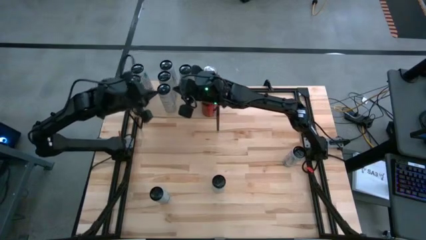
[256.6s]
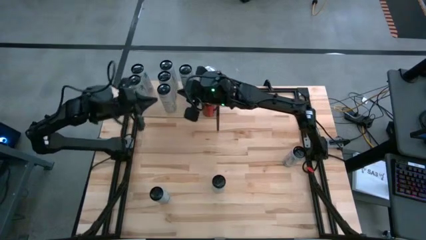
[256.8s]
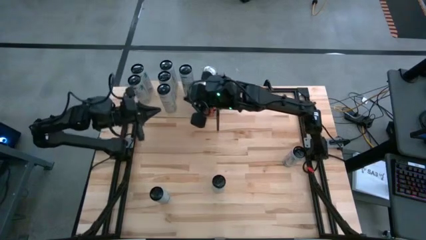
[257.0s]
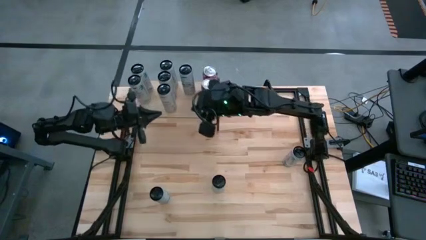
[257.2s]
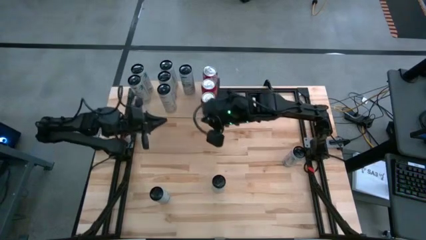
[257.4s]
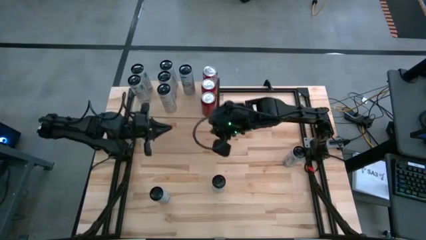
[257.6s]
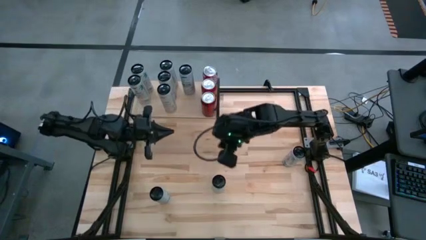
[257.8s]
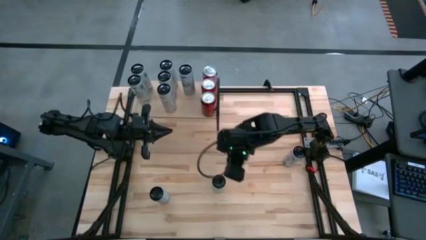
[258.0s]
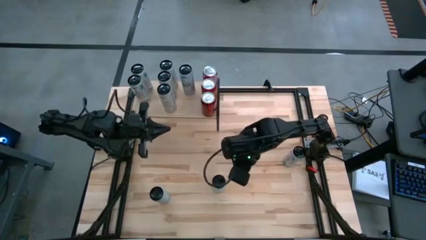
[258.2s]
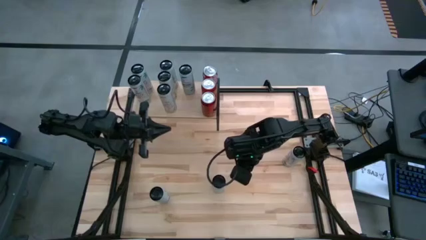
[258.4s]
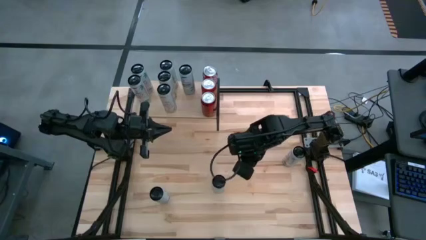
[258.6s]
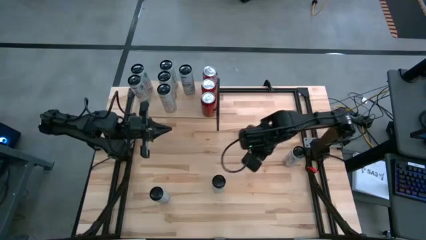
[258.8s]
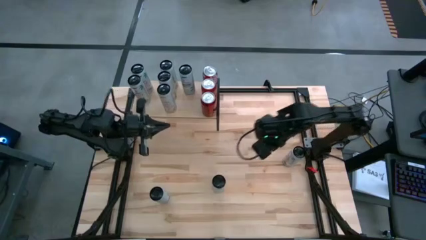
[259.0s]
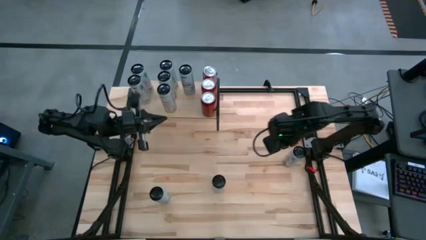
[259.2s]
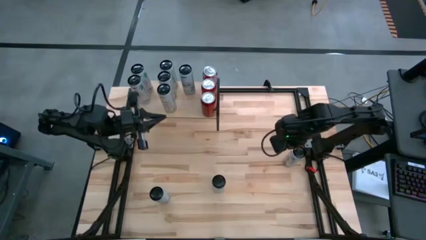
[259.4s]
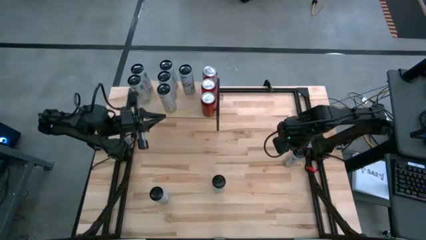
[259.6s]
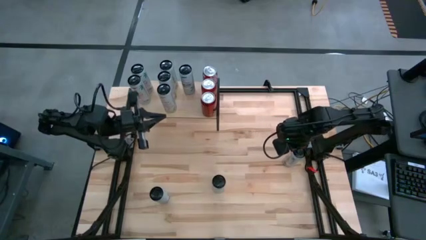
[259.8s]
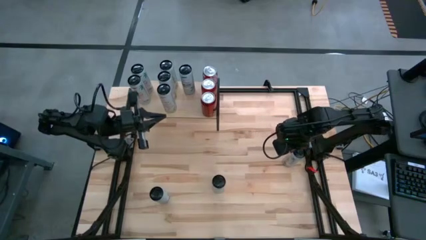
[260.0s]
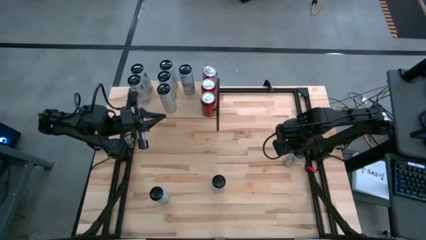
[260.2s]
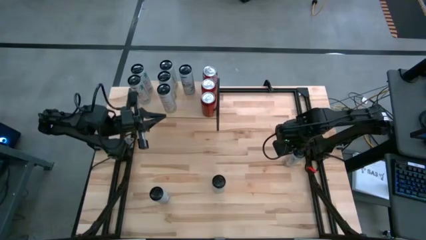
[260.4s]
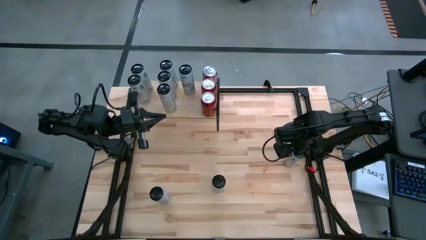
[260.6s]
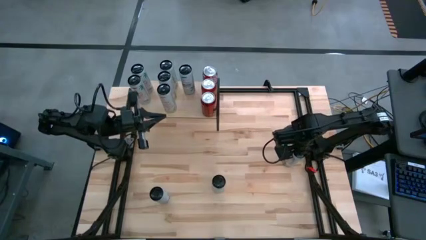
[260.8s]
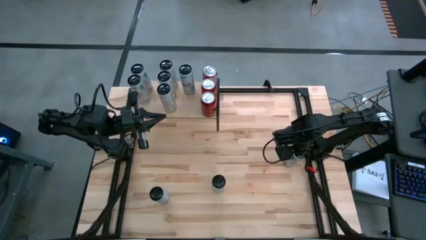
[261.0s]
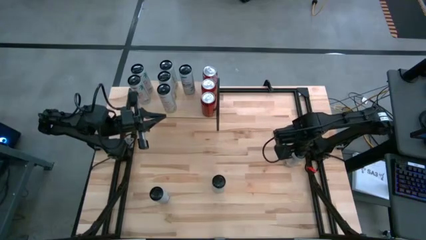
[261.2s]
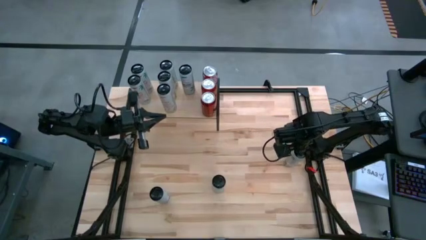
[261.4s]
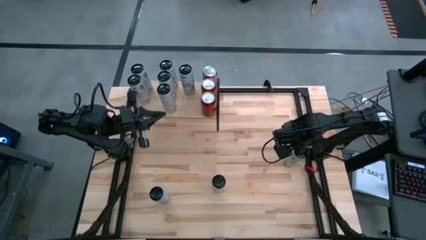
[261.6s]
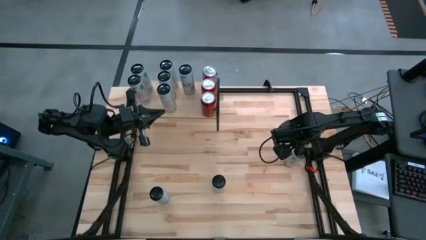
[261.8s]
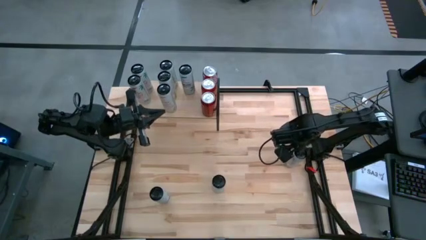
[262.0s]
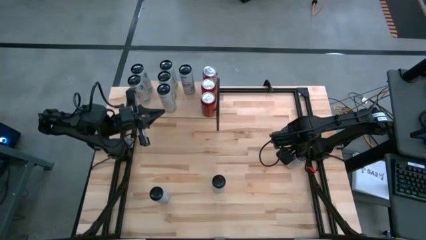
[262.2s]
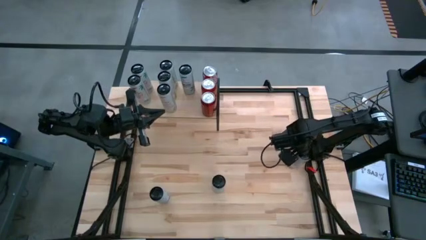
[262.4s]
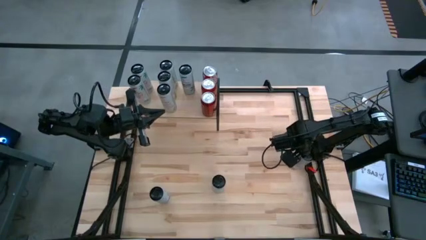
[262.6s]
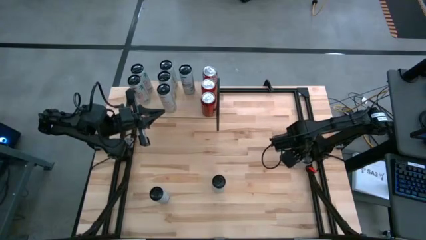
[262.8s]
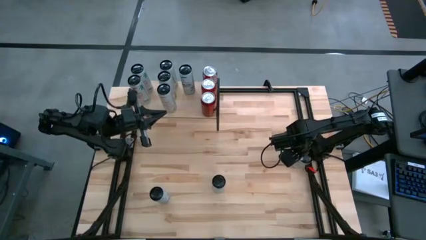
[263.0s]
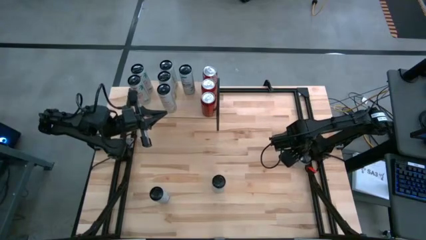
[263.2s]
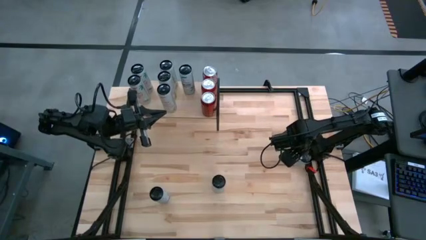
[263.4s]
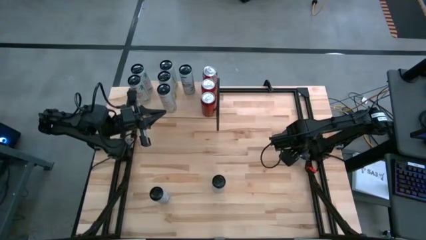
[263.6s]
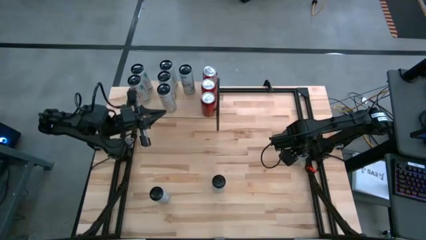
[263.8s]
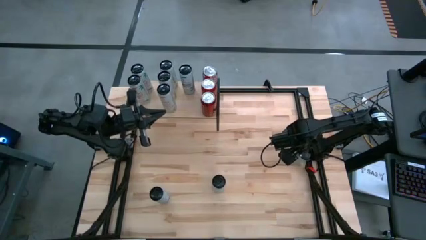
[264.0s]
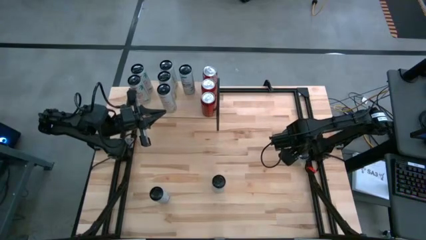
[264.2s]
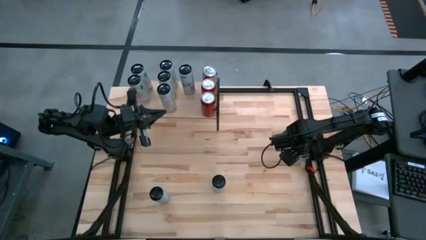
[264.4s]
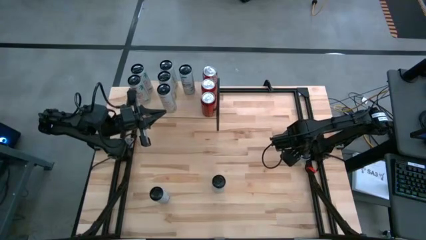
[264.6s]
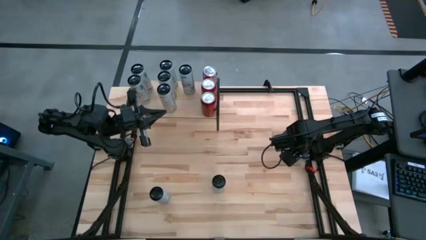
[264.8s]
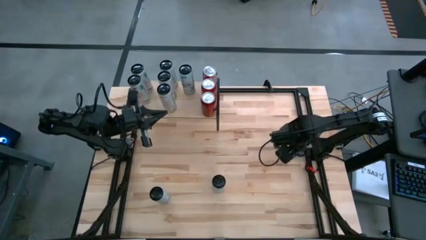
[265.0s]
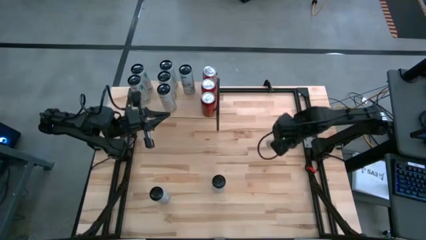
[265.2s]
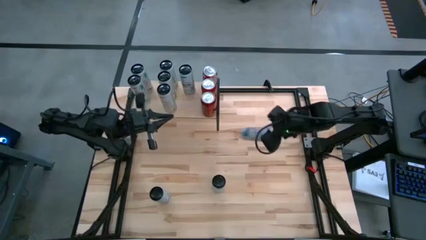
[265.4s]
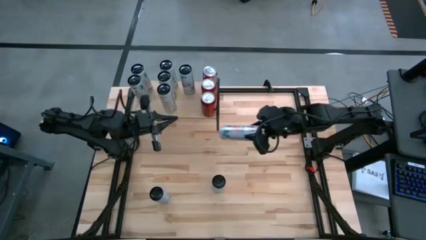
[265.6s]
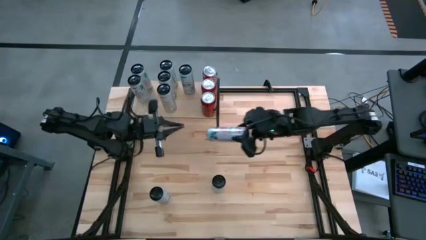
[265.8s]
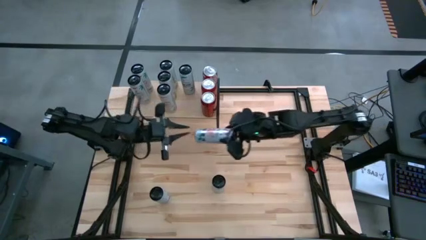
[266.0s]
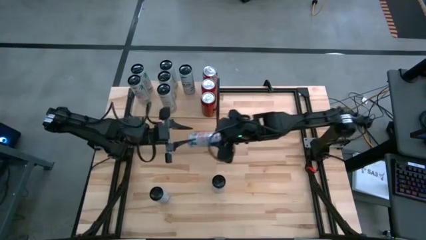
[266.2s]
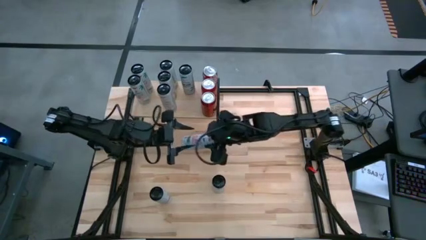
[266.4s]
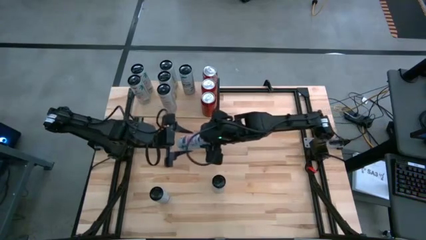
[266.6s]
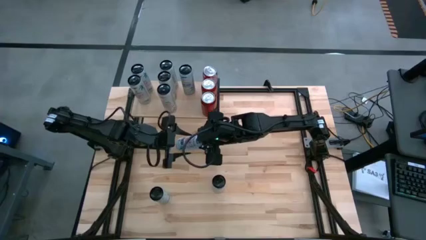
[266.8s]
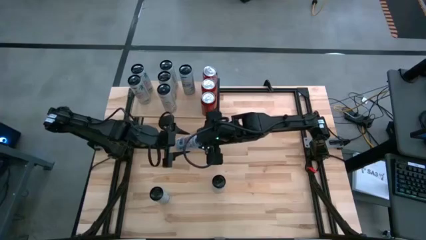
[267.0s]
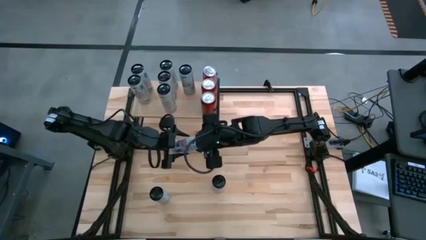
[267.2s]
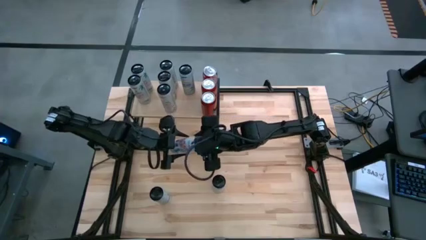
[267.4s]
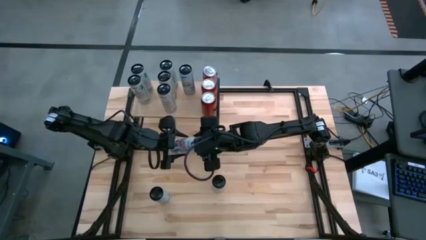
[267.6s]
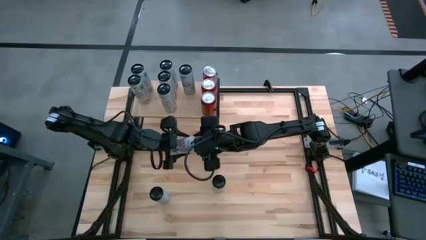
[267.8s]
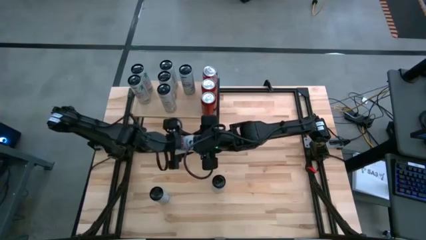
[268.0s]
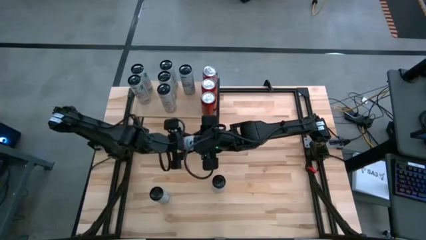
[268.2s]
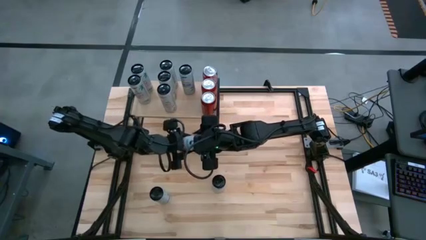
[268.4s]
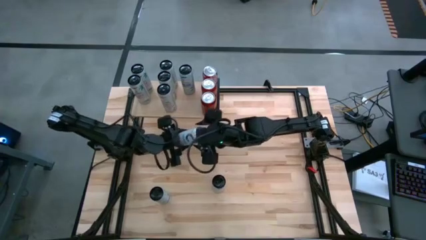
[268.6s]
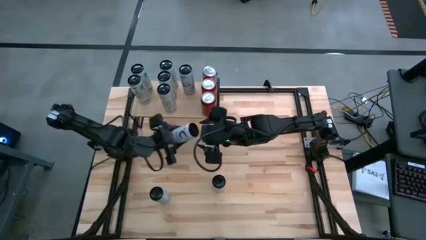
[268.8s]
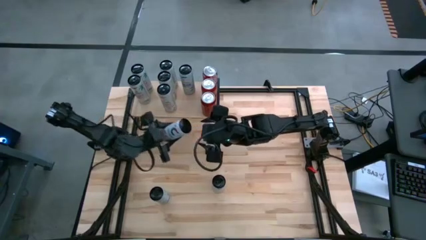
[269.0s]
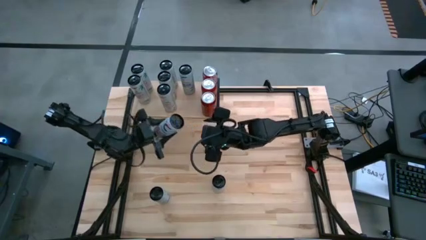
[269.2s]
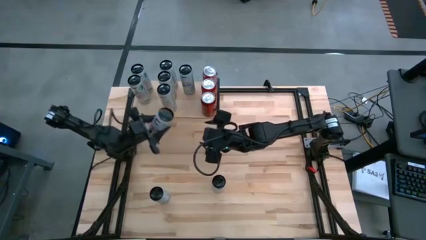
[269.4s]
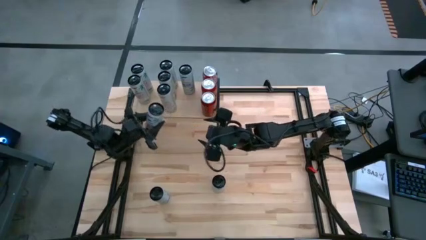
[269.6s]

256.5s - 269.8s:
Task: Place canned beverage on shelf
Put the white pink soda can on the shelf aligned with the other white pink soda cans

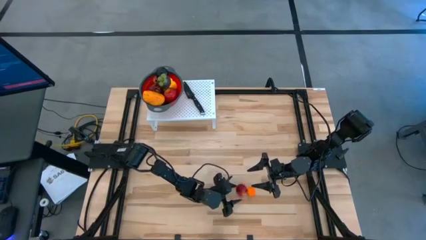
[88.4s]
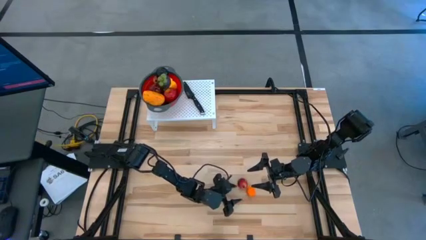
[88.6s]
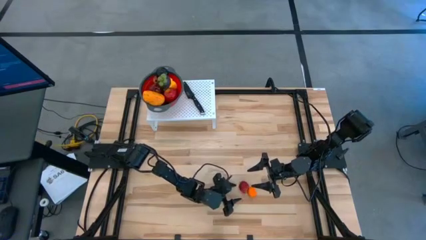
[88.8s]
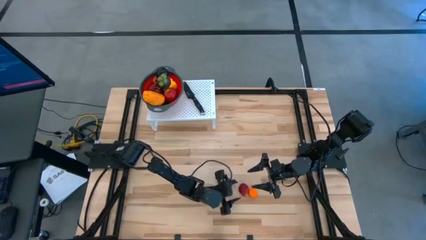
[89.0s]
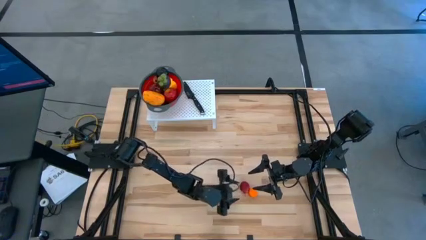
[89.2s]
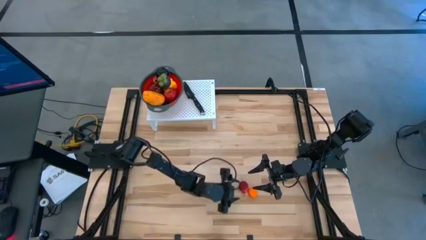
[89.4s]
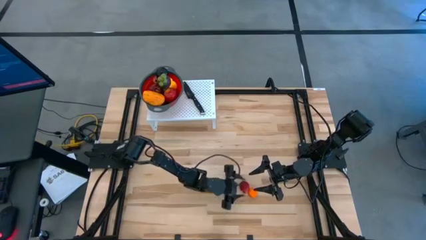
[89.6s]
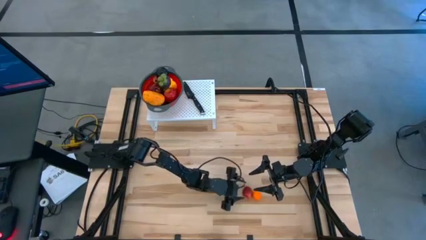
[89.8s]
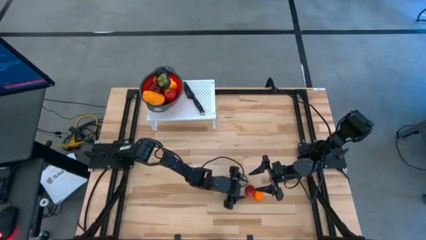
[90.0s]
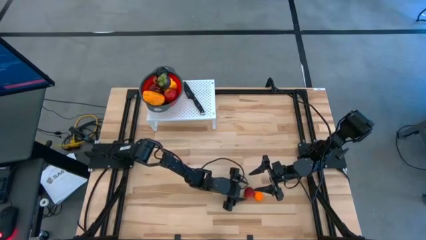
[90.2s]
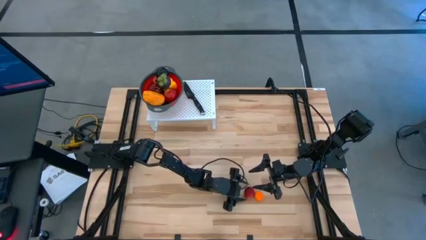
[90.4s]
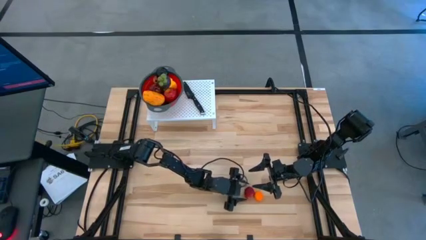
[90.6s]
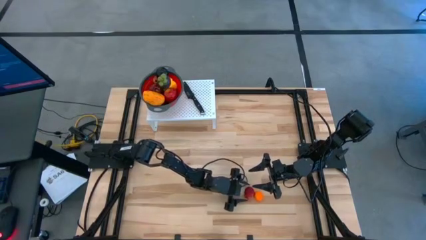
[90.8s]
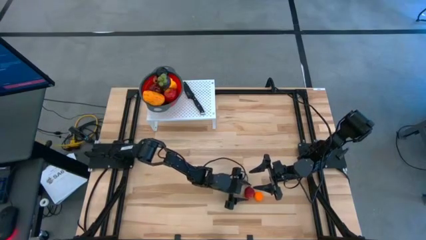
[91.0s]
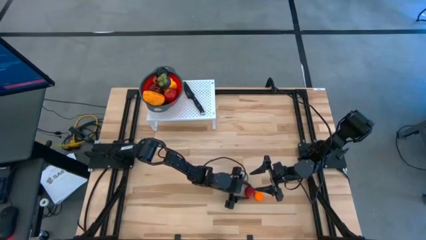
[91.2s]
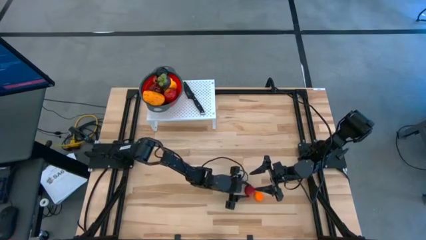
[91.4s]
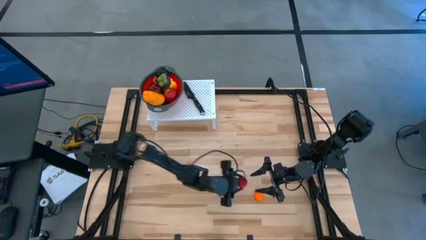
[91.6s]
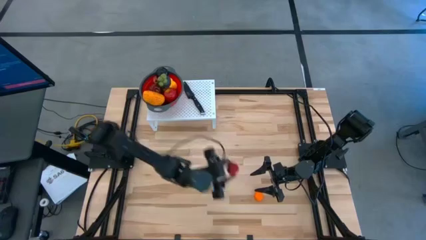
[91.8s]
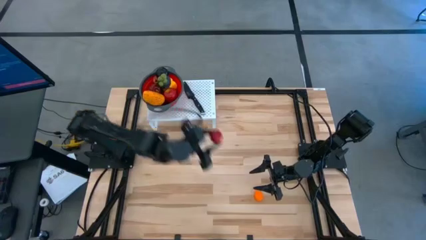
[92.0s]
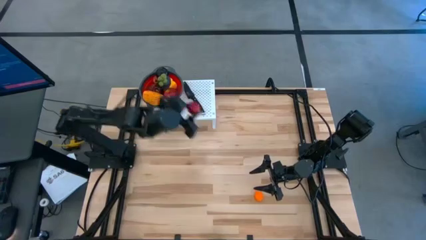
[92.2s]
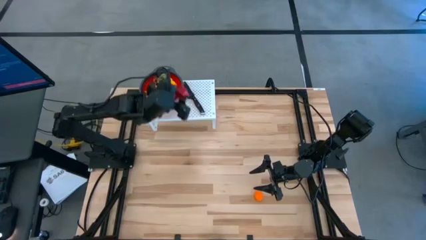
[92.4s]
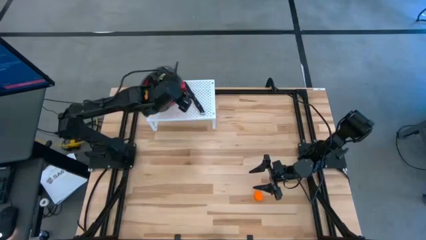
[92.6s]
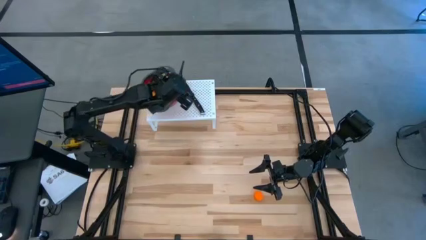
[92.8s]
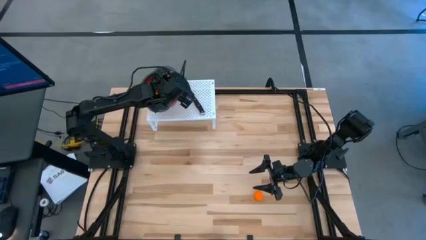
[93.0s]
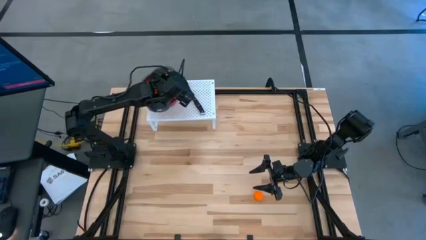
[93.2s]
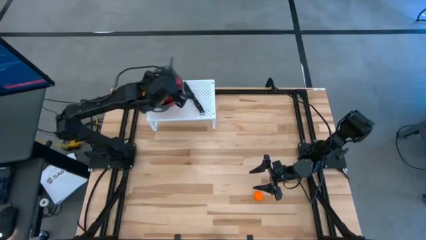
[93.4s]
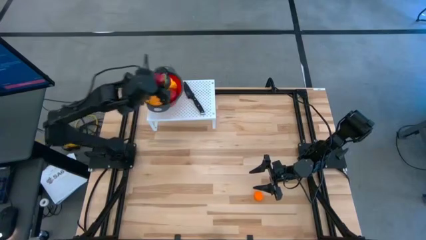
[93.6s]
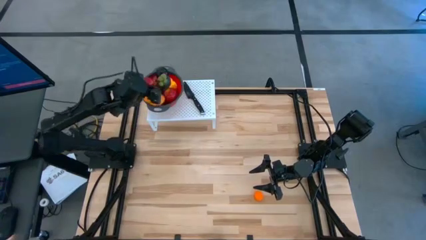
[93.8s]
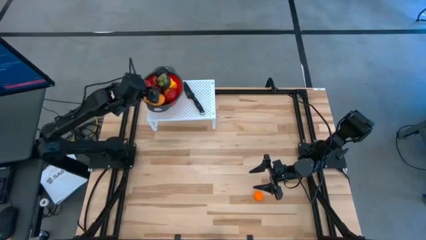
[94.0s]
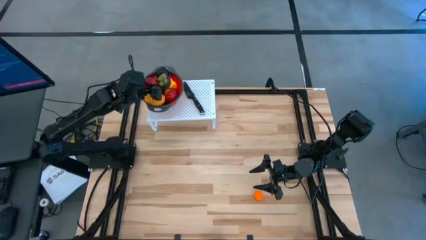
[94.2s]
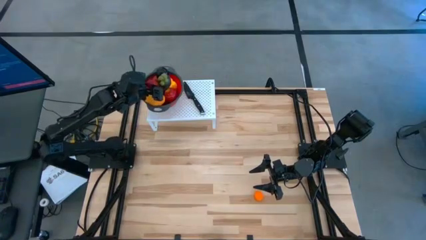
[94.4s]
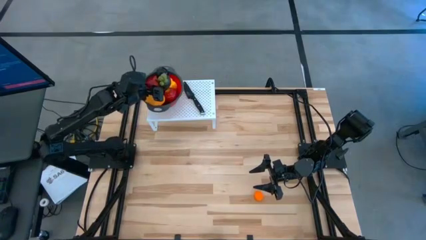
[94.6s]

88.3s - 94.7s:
Task: Pick & Place Fruit
Put the red pomegranate into the red strainer bowl on the shelf
